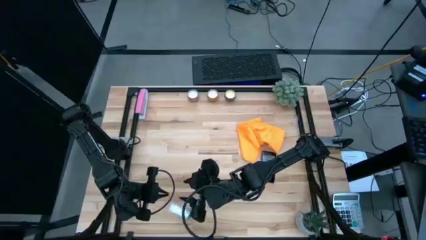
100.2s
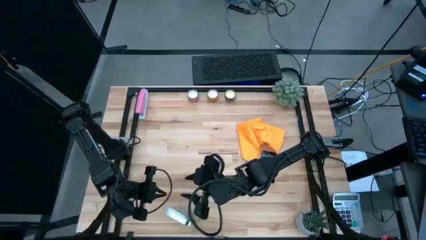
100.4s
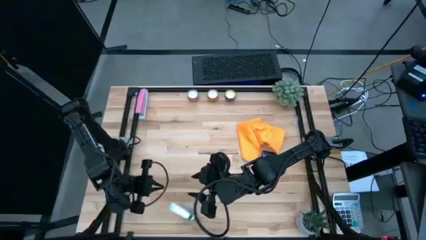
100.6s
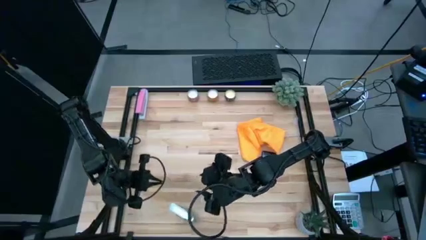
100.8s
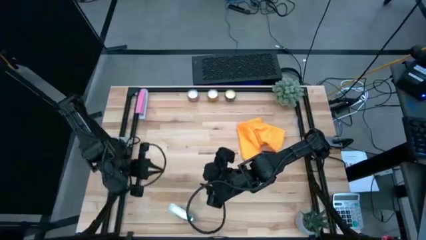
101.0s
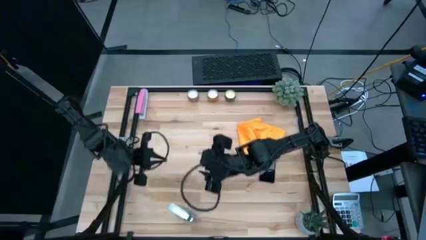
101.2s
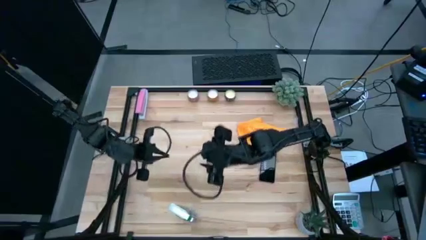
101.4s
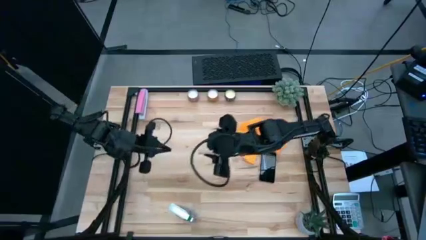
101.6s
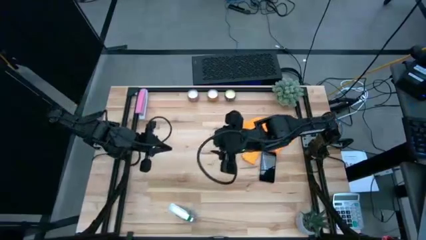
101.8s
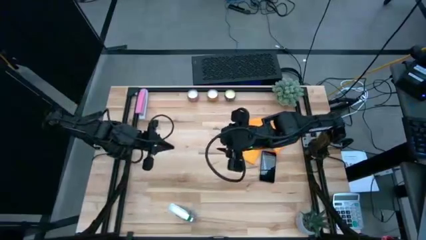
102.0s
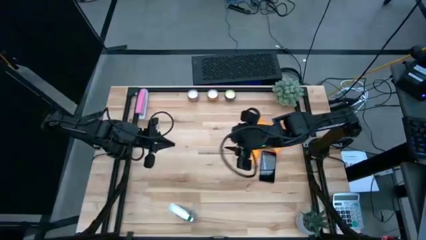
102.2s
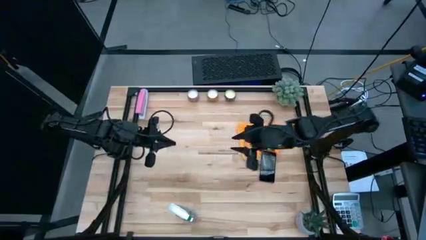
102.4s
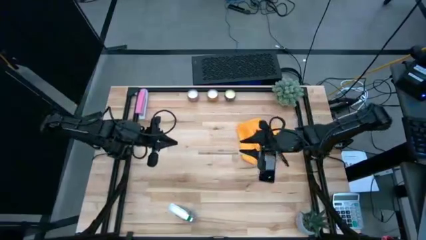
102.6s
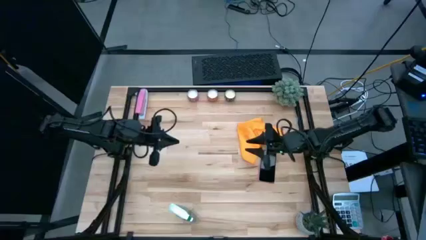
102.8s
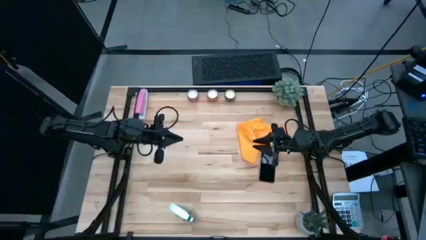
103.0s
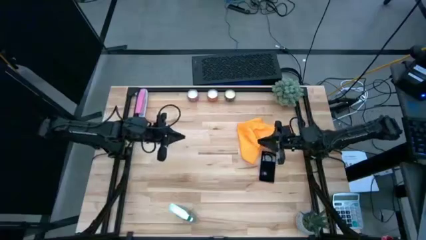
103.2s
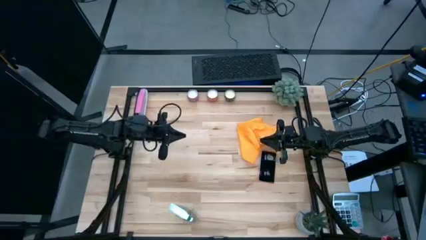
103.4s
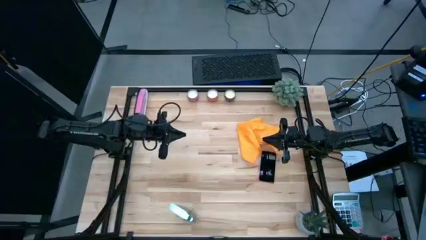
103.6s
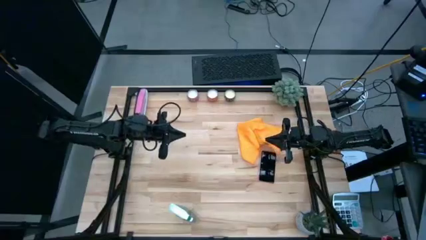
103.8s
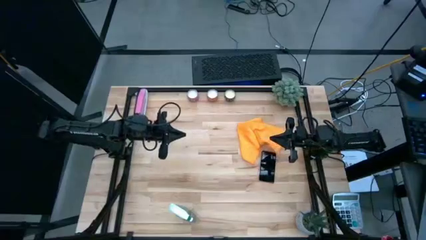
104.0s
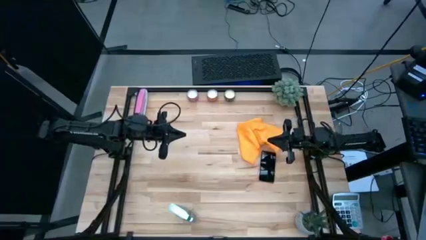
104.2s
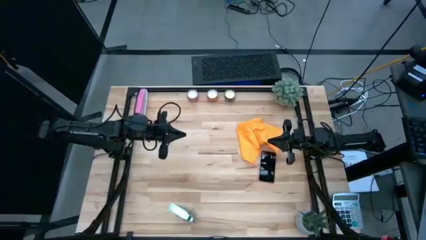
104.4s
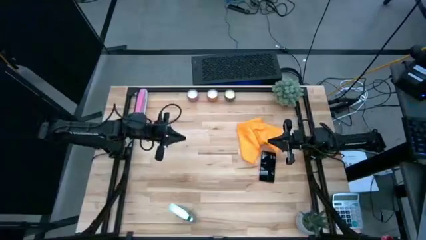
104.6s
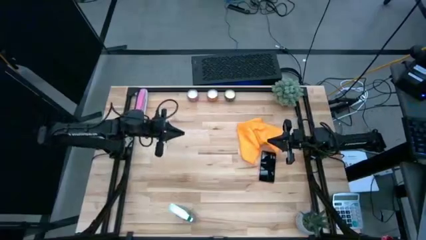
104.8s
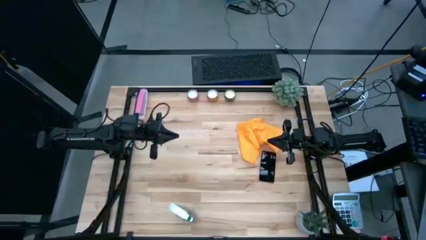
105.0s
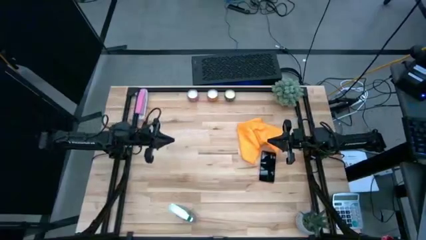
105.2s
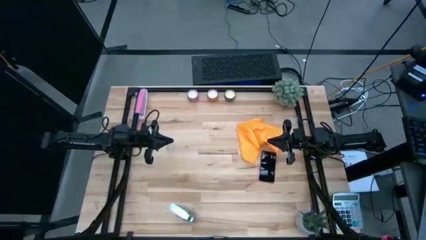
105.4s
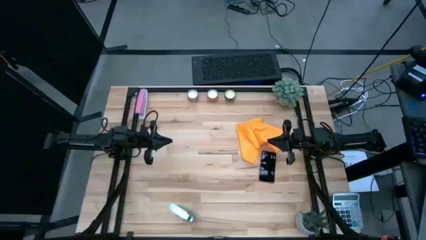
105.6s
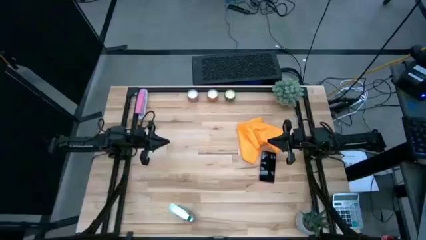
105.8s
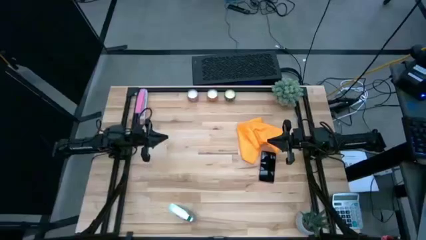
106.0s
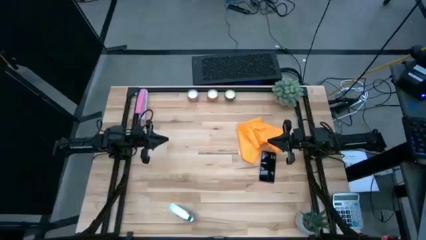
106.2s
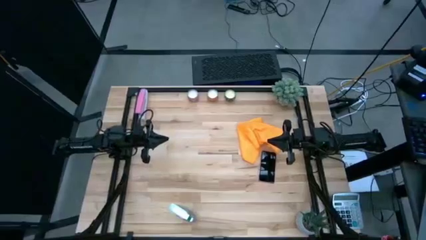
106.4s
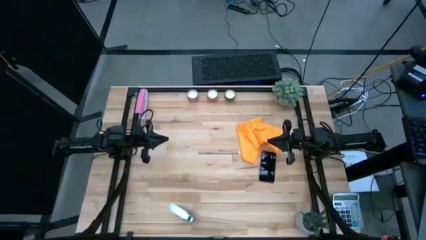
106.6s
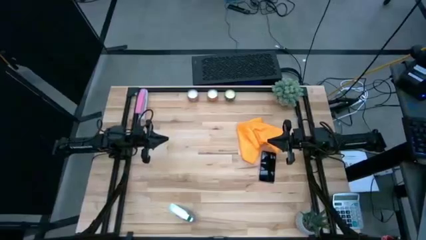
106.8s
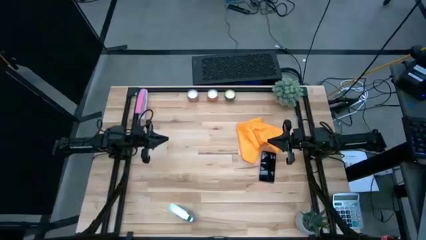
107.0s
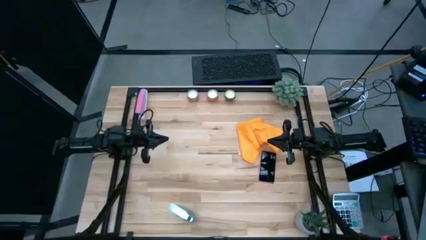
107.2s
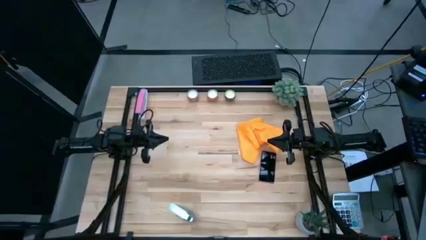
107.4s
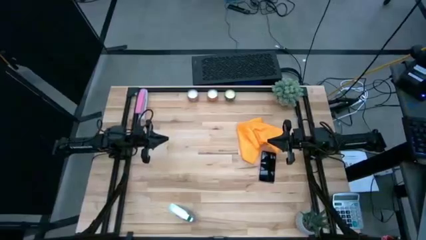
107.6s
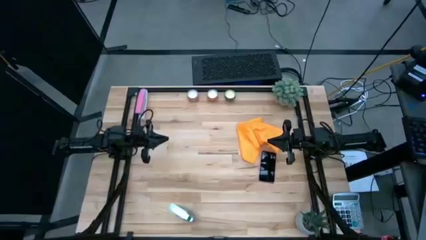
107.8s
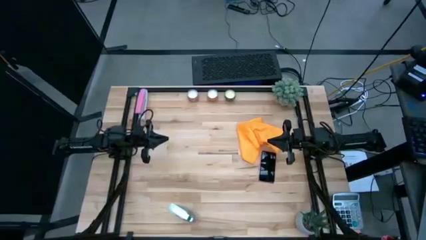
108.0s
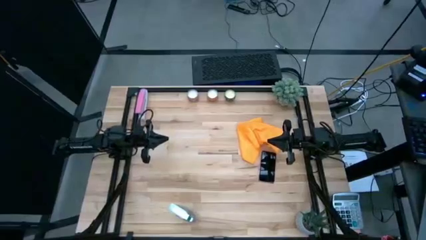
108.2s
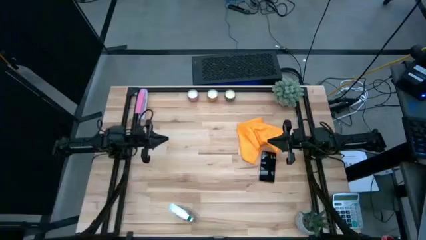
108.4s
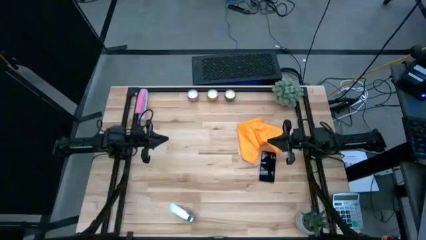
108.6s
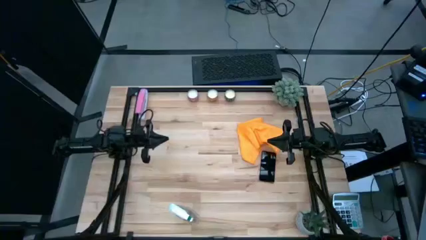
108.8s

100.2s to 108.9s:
Task: Apply microfiber cloth
Return to Home Position

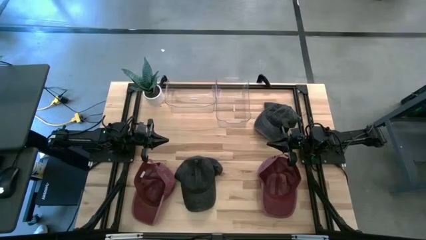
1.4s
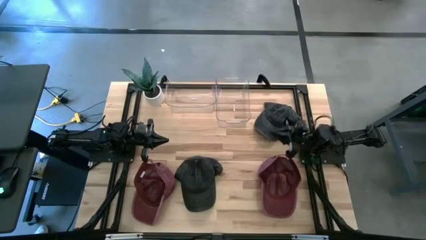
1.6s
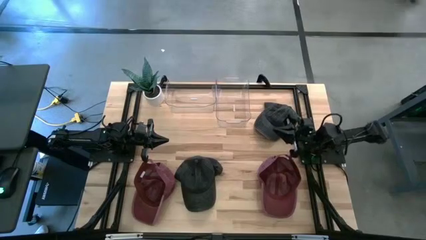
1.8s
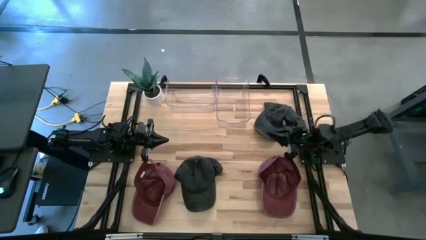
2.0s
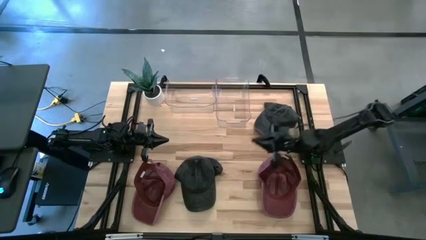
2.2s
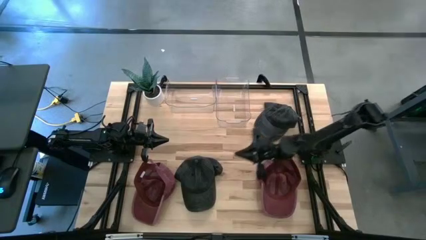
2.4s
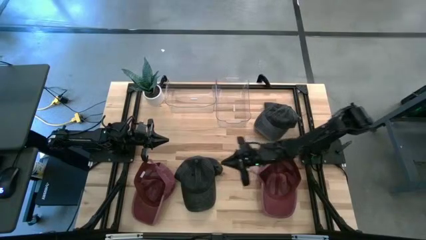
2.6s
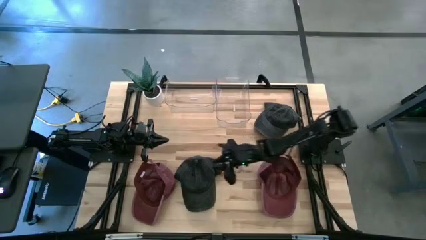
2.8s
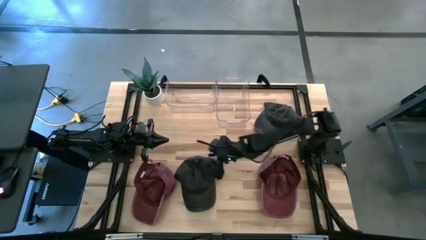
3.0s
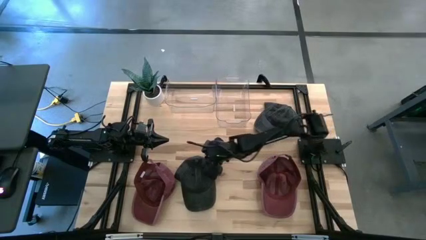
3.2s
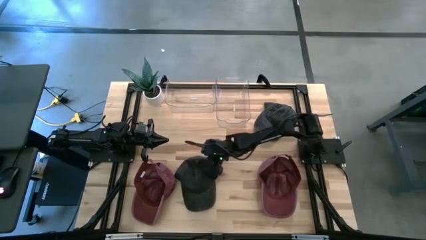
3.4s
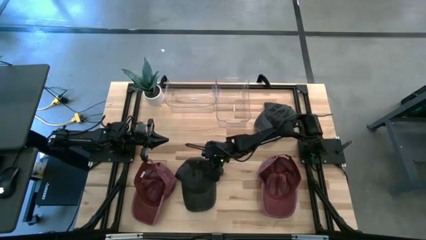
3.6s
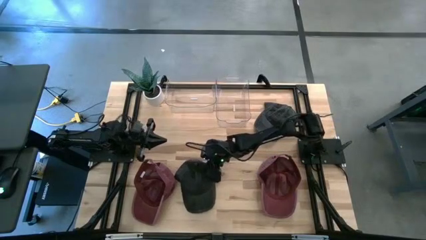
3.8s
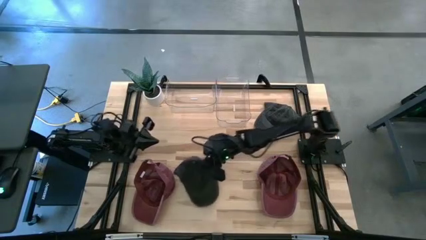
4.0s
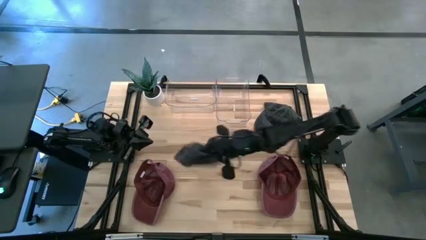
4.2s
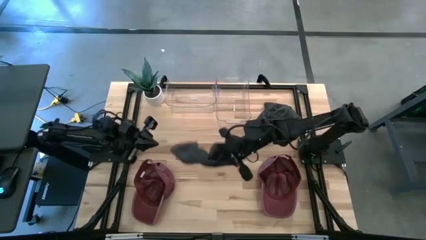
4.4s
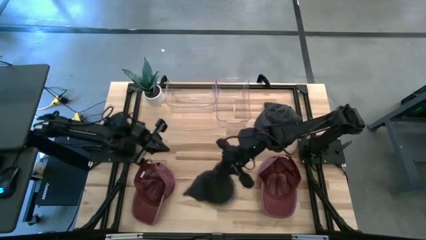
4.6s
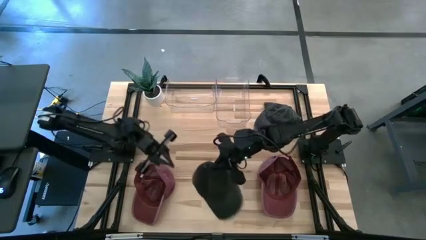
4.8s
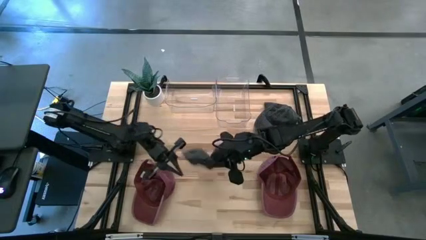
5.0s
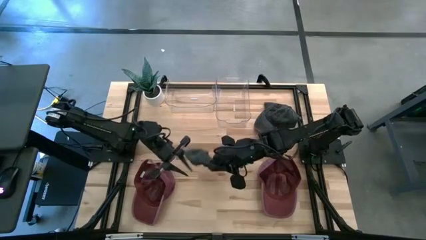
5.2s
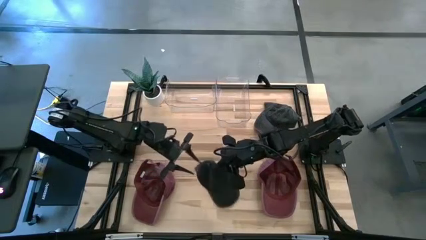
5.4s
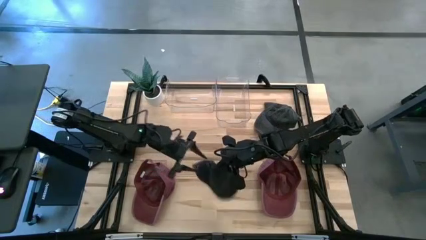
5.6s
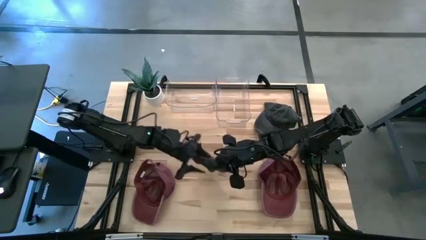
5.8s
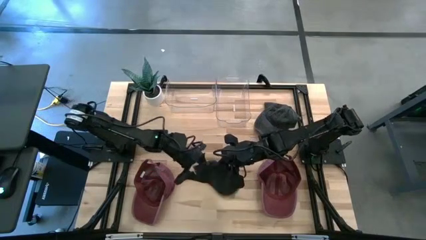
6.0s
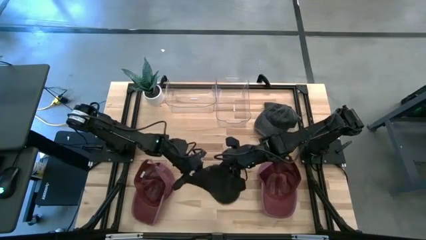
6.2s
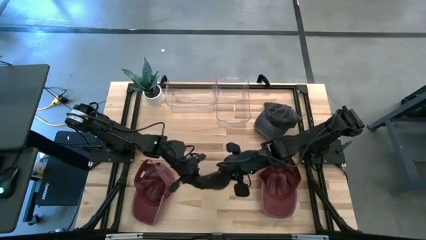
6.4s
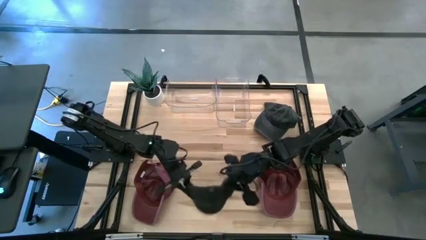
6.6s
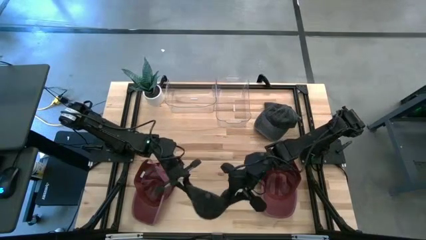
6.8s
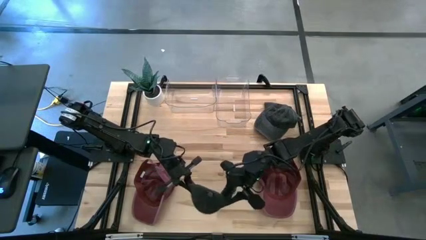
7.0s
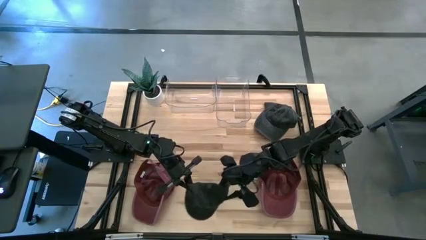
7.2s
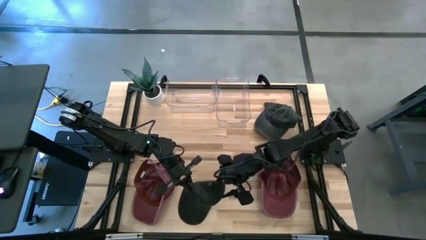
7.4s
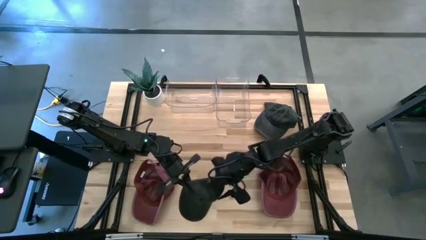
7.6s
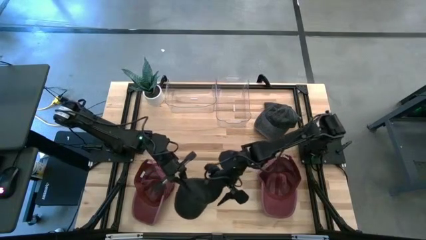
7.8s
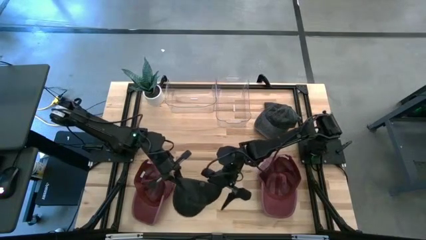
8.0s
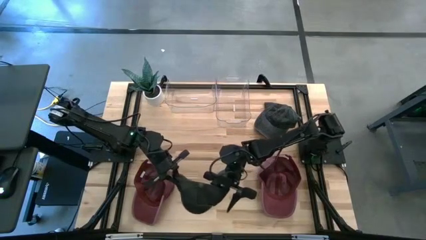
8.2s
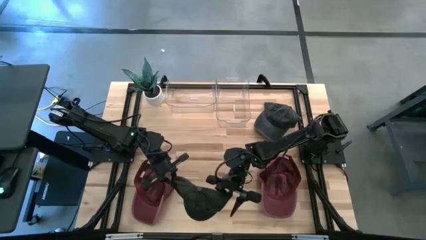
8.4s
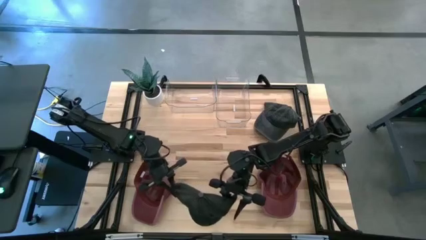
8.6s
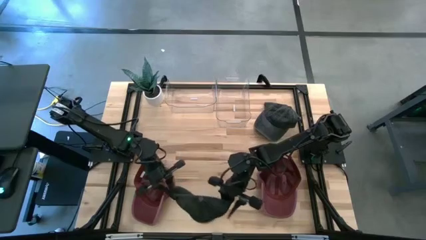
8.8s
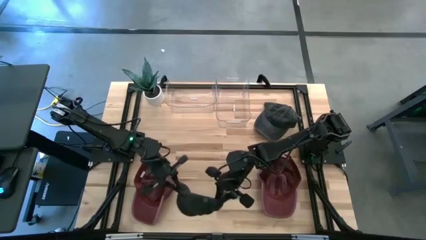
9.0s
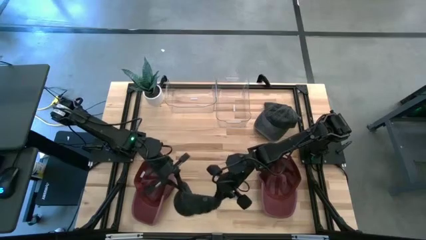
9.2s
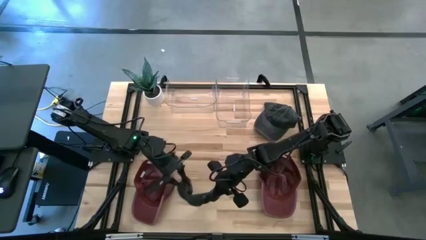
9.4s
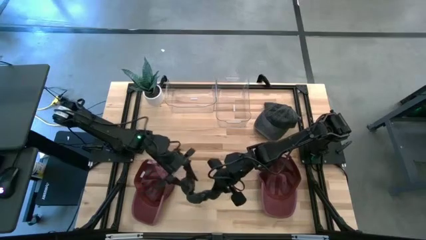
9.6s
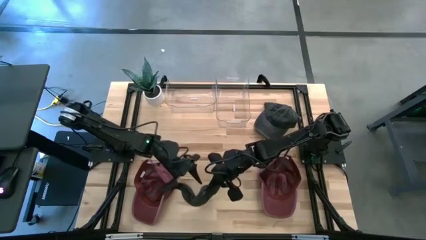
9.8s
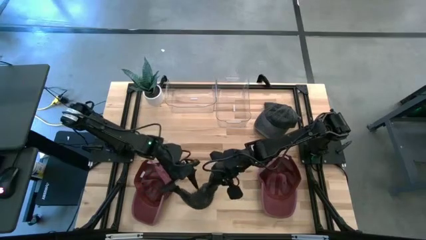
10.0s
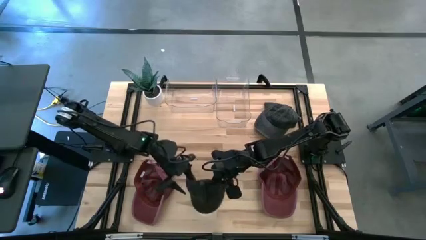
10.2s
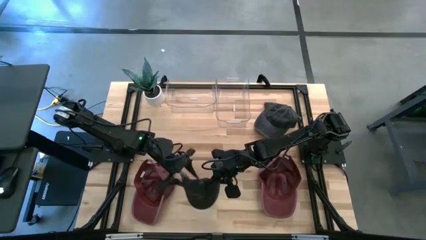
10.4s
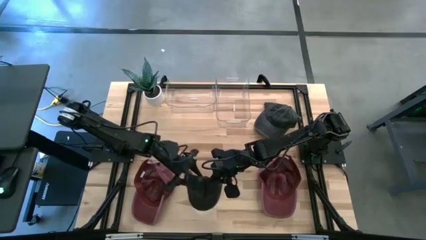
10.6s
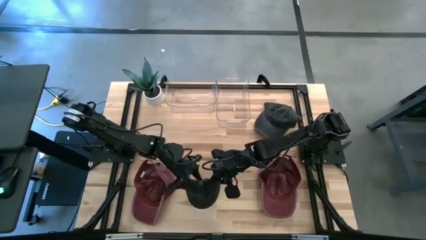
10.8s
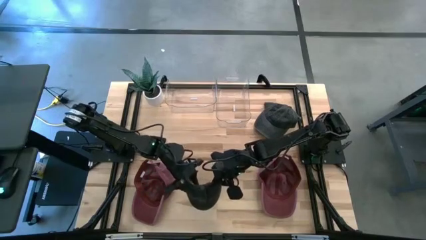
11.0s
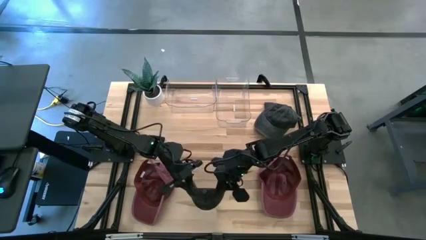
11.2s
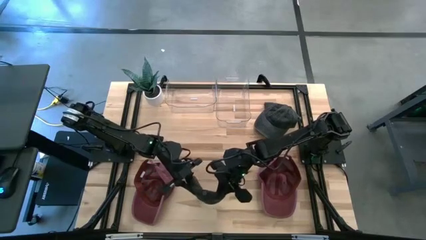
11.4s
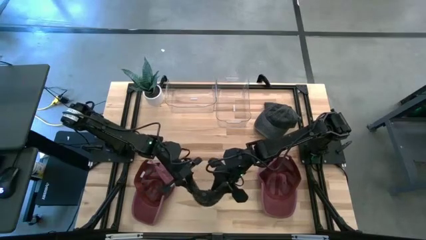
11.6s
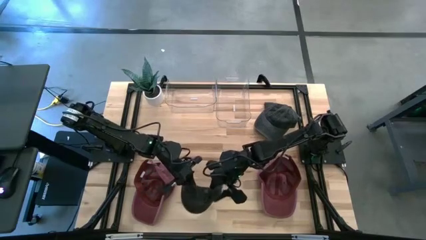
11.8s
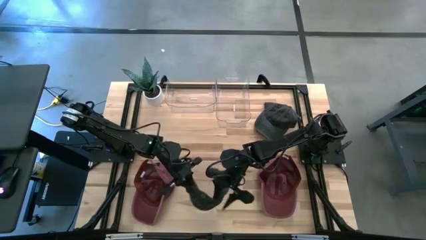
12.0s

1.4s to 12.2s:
Task: Pick & Place hat
Put the bottom black cap into the right transparent bin
